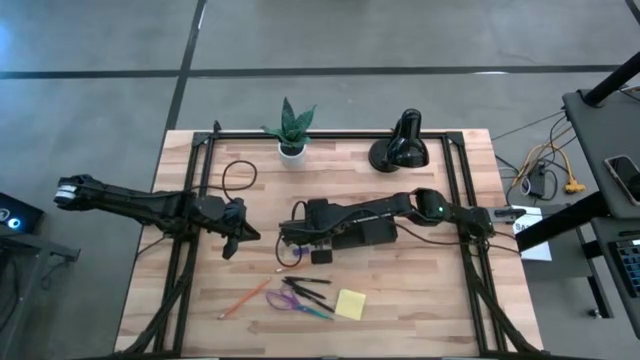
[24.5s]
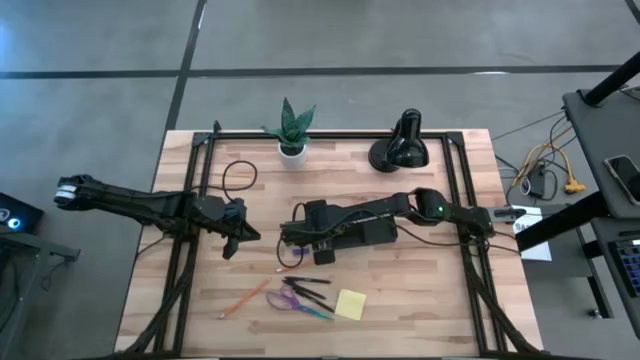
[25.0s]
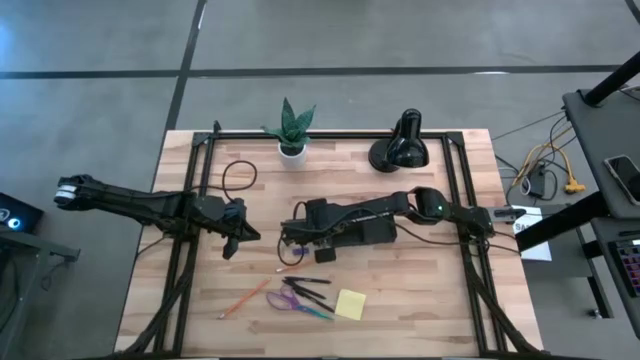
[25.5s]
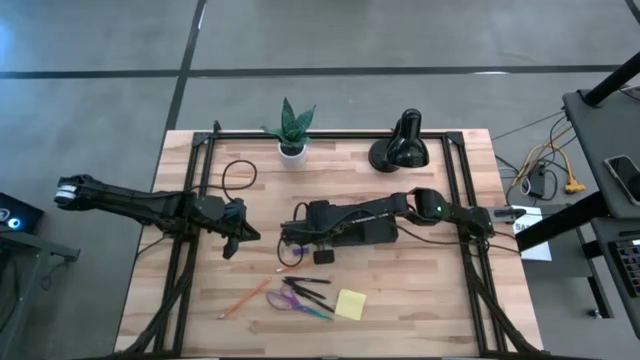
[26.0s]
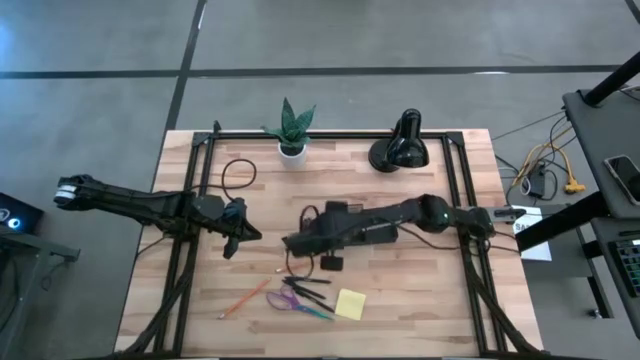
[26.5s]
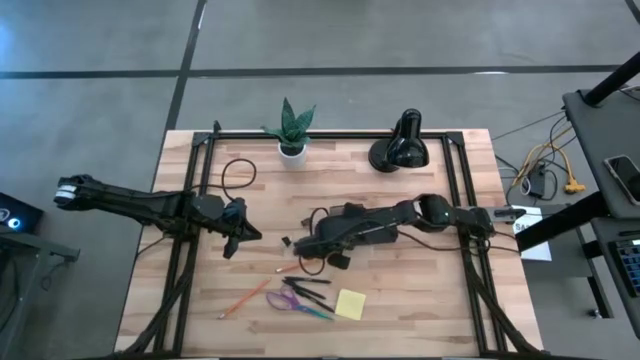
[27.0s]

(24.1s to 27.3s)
Task: Pick and place office supplies into organizer
Put the bottom right black binder clip into the black desk organizer

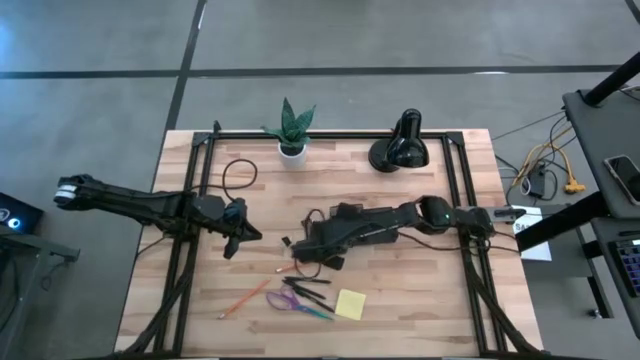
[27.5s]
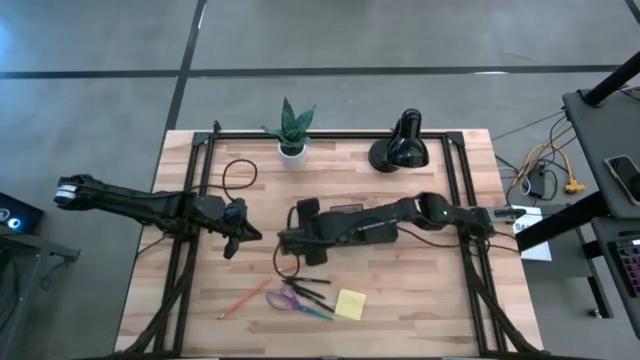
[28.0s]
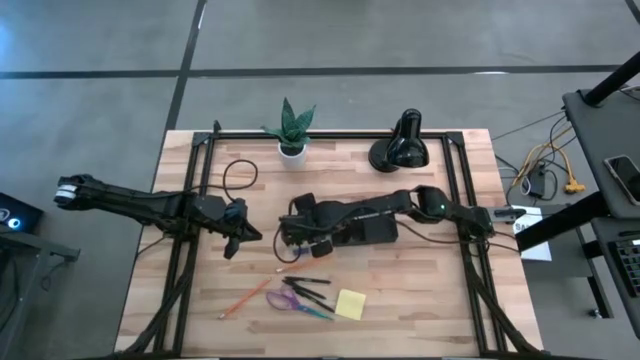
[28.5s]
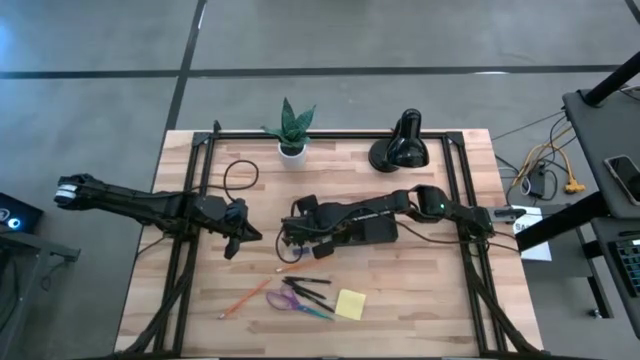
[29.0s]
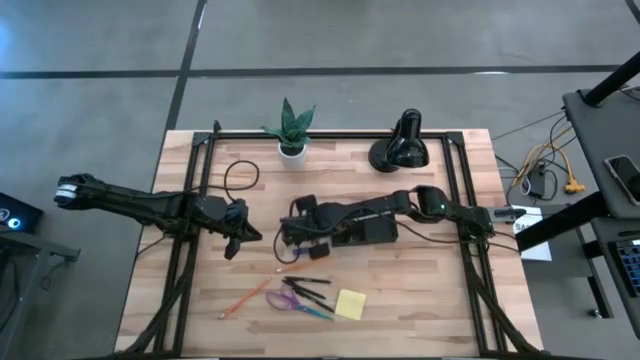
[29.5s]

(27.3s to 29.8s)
Put the top black binder clip into the black desk organizer

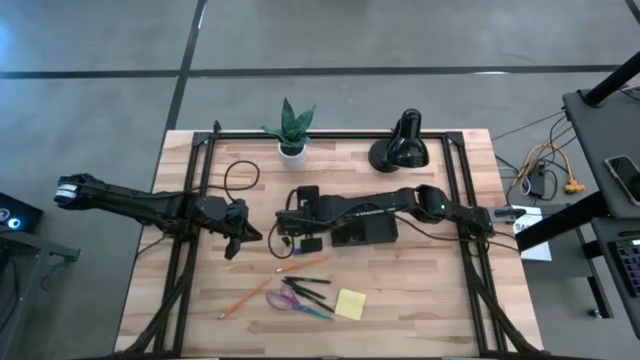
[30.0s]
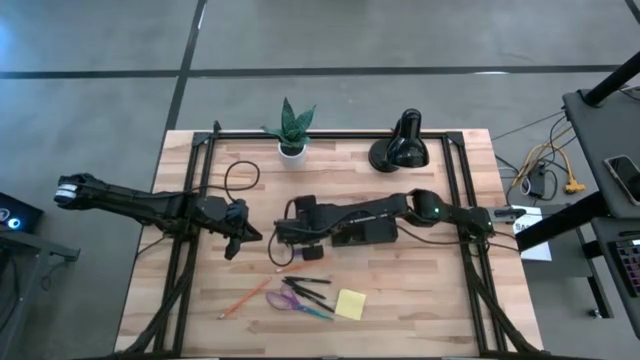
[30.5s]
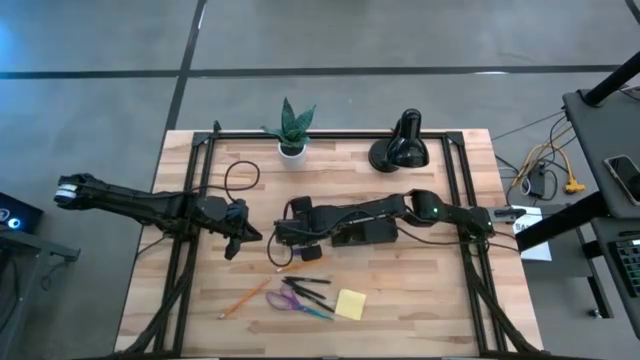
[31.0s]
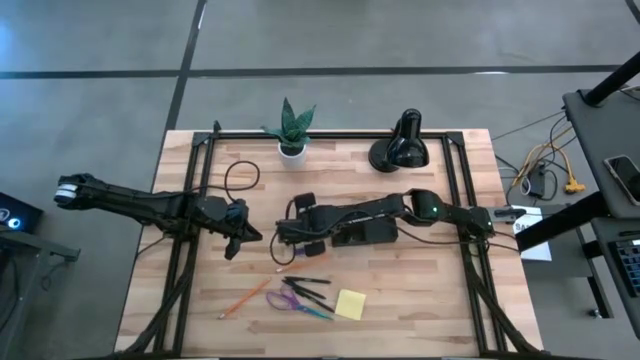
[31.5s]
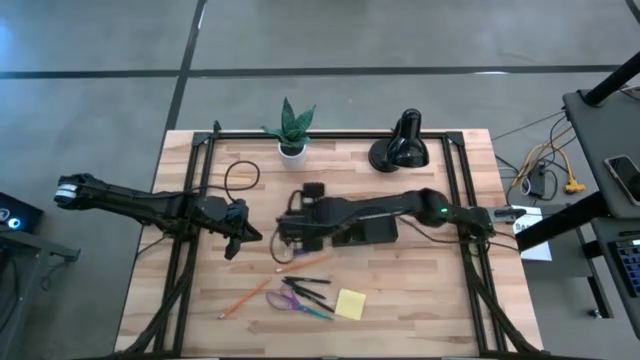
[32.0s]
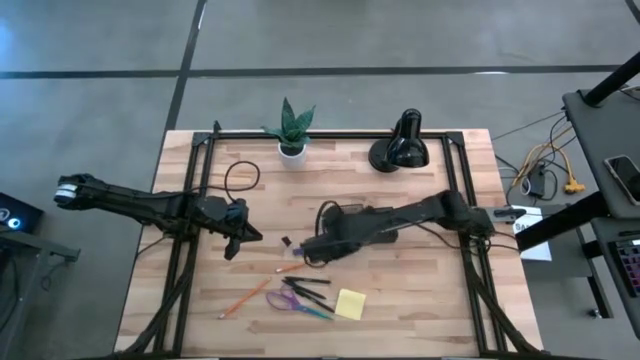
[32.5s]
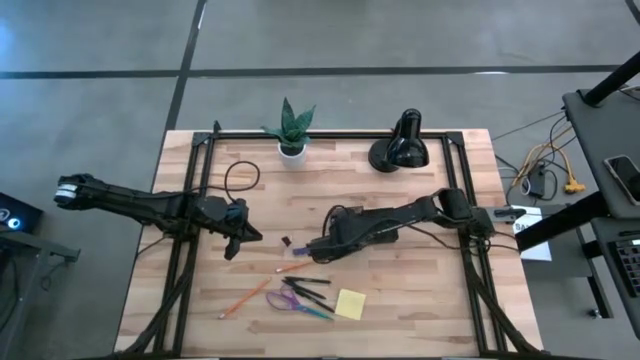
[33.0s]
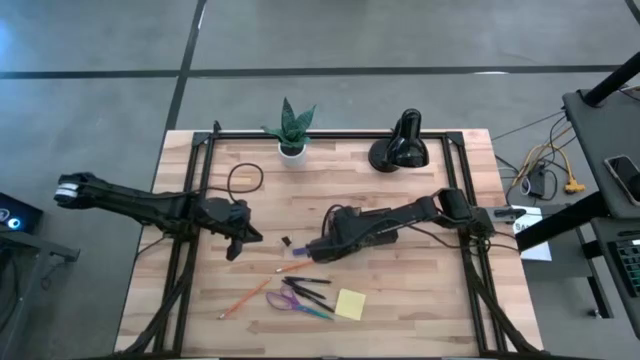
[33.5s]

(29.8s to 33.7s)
Put the top black binder clip into the black desk organizer

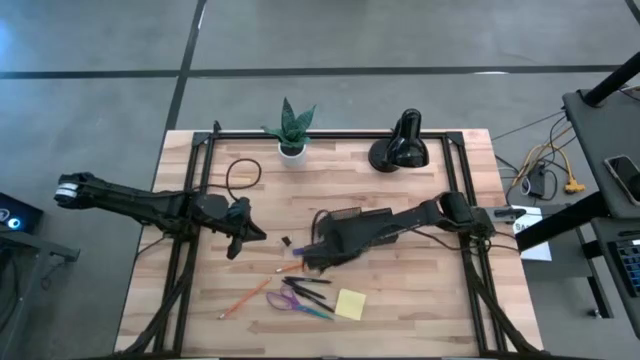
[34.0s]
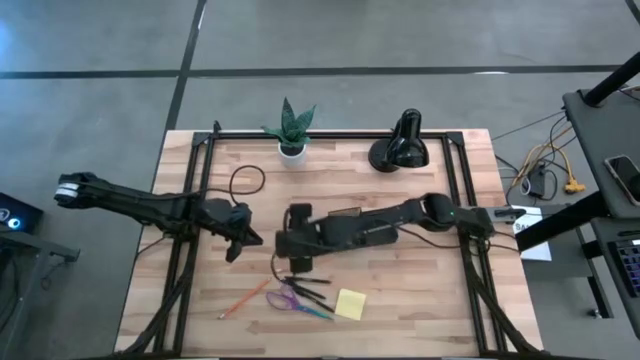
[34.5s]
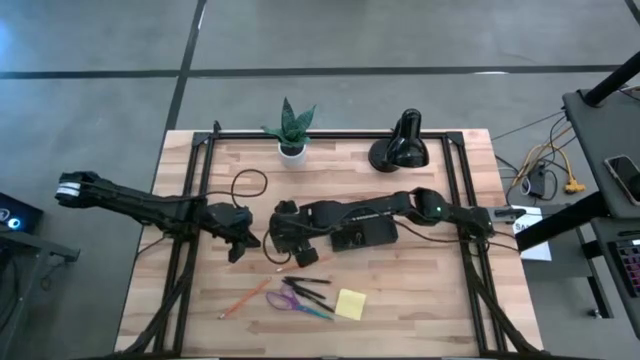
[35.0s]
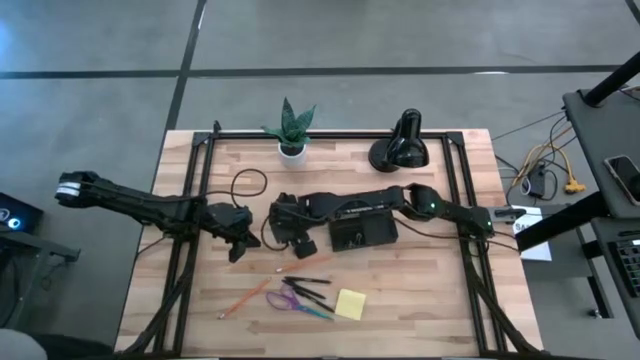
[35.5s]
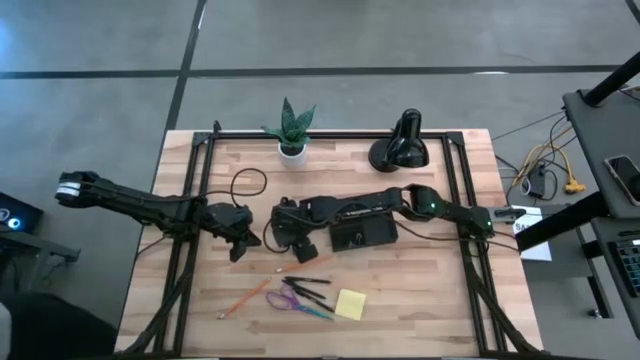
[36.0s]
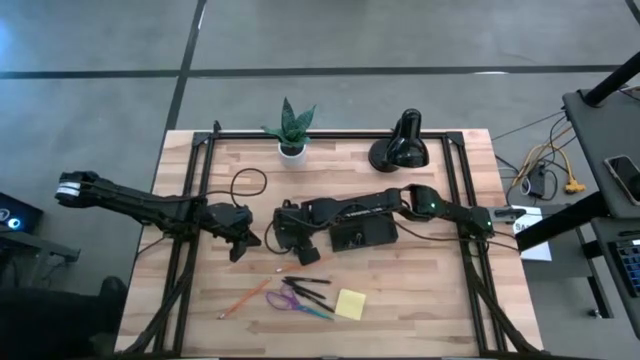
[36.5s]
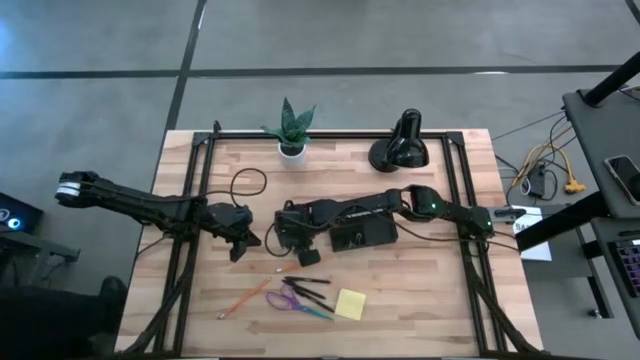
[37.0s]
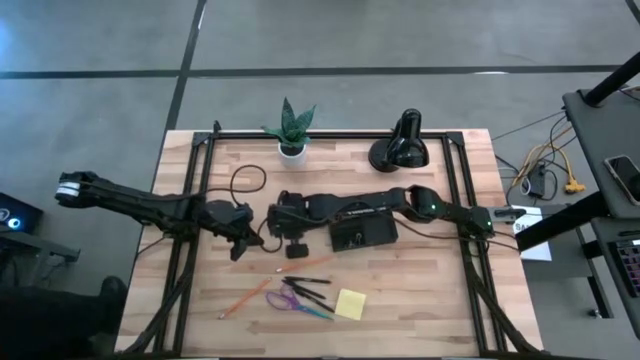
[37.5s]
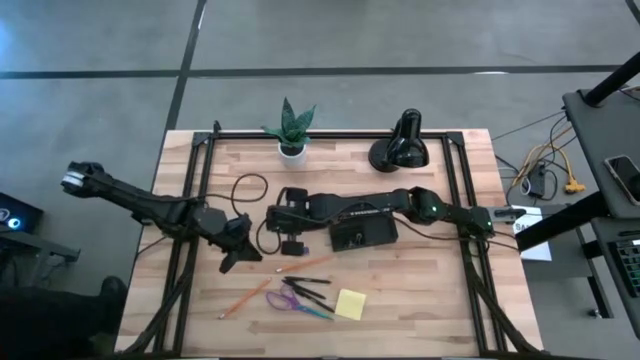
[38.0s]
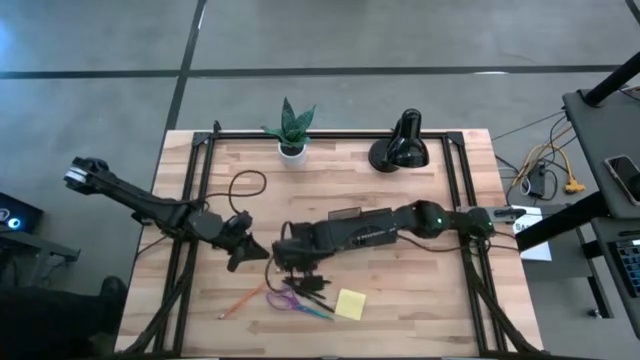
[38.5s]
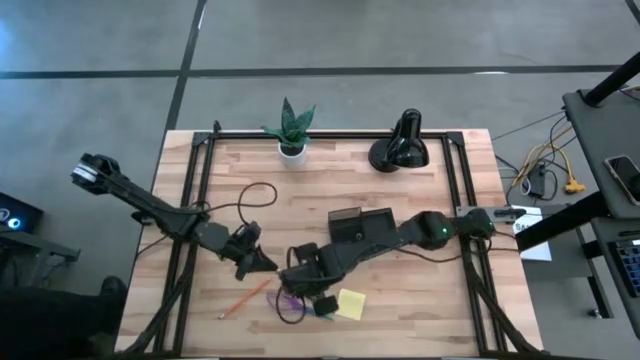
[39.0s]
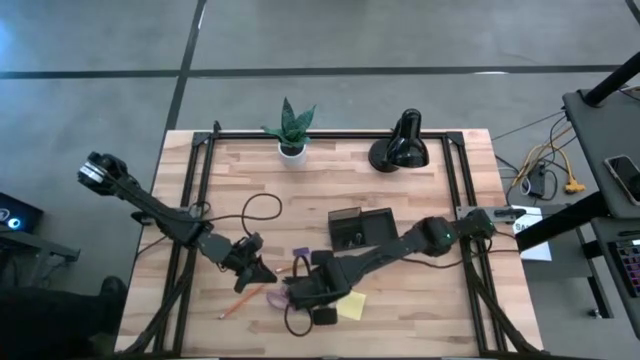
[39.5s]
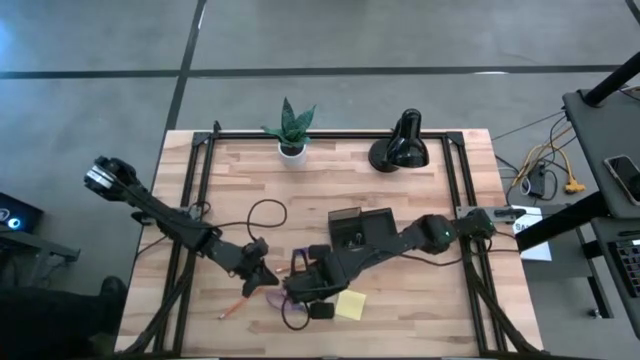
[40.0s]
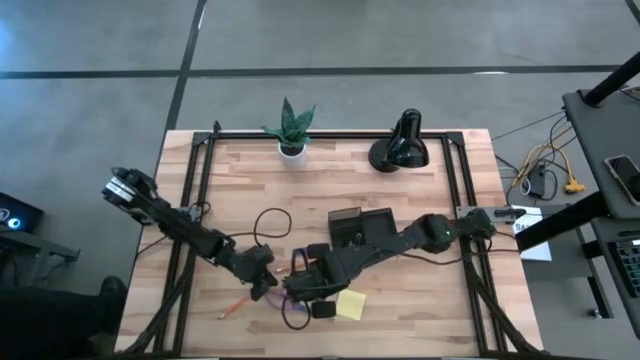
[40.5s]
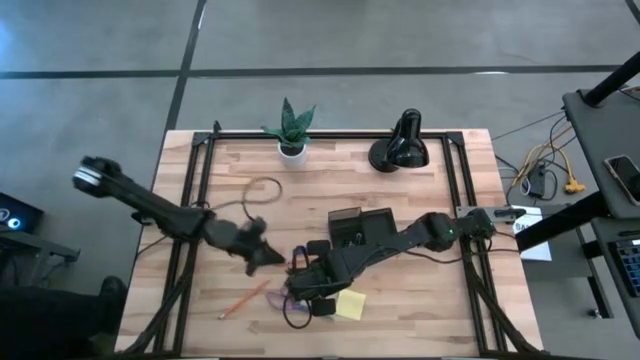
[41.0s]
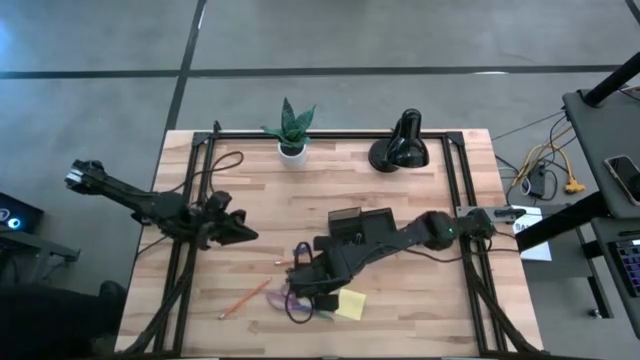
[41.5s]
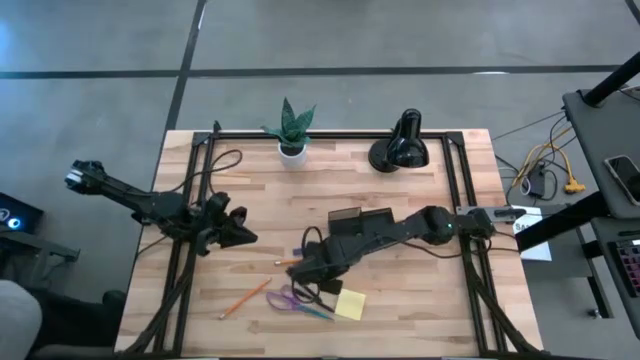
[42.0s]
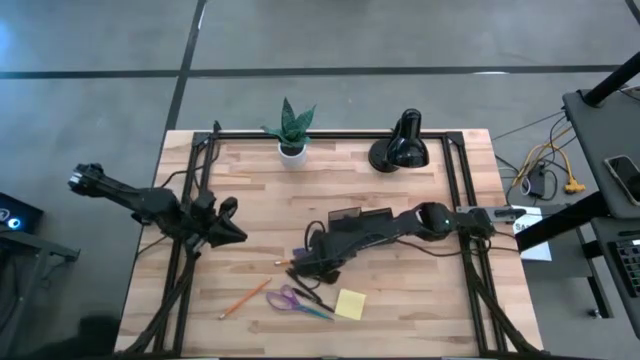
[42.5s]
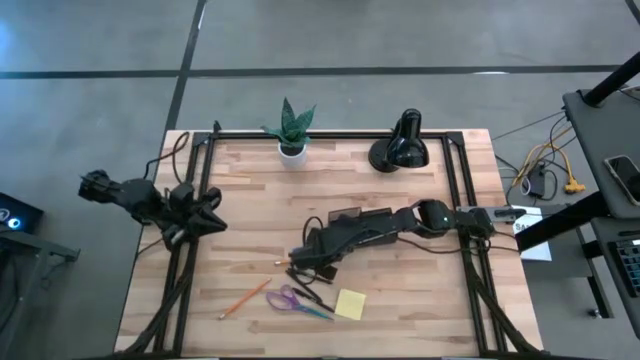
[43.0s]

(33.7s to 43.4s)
Put the black binder clip into the black desk organizer

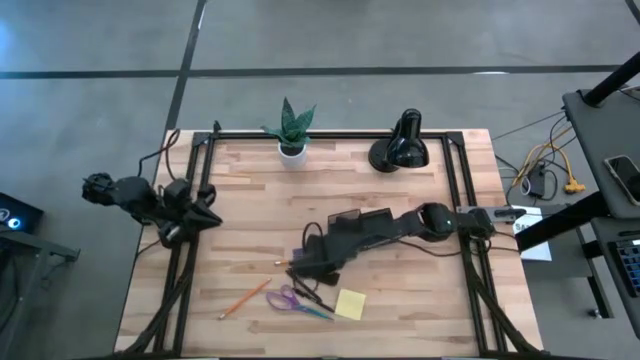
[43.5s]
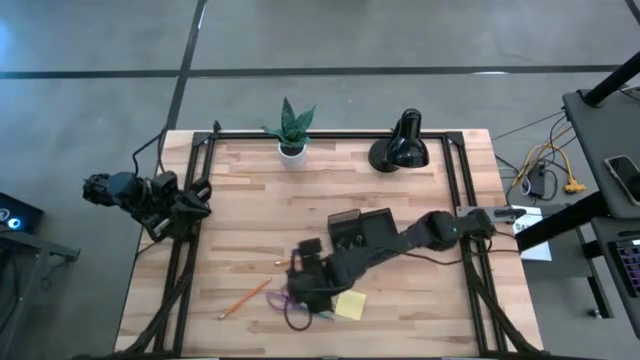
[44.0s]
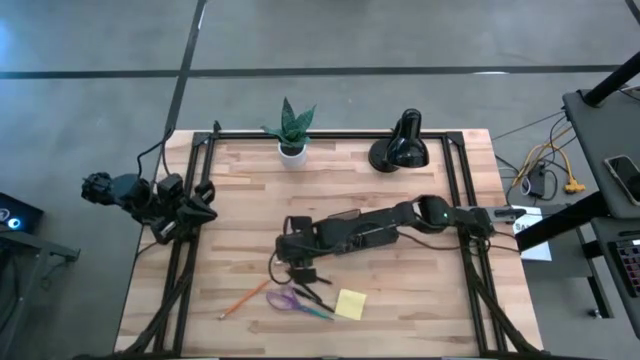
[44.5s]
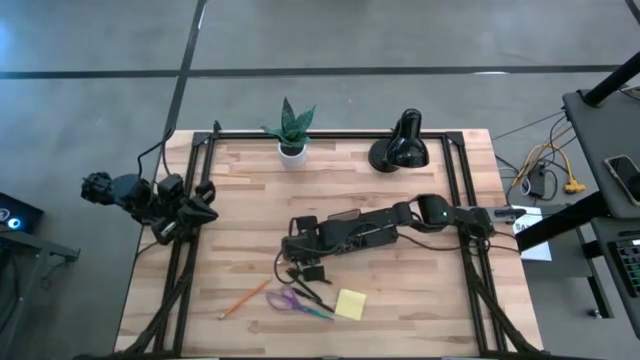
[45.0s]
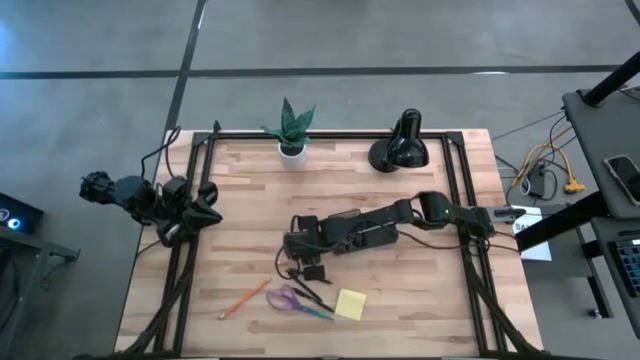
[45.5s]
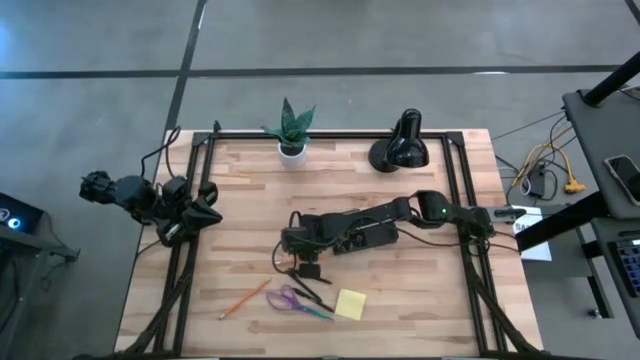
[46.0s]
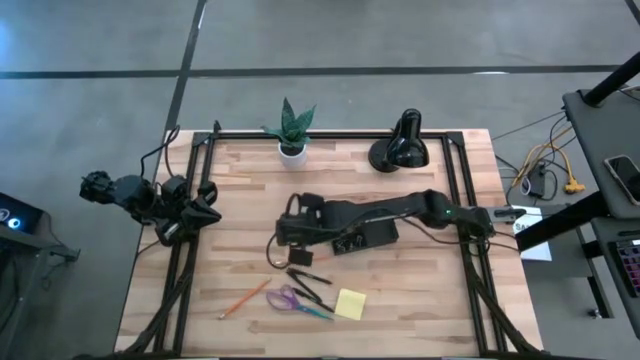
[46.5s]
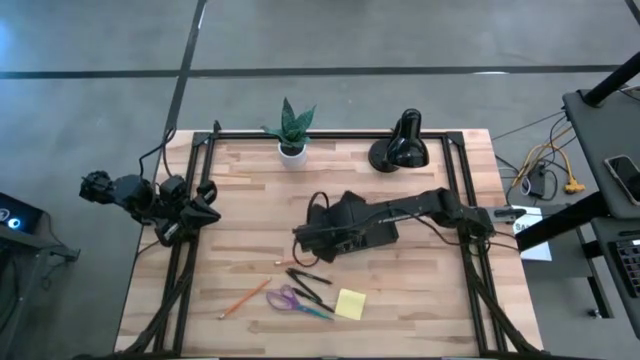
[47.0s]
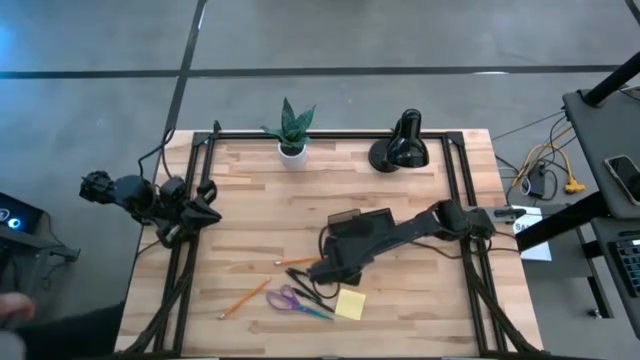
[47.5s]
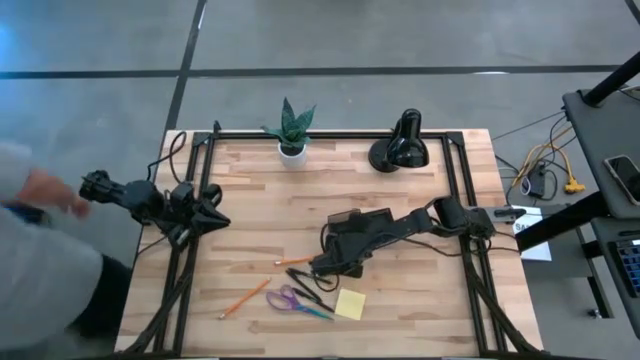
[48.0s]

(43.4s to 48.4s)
Put the blue eraser into the black desk organizer
